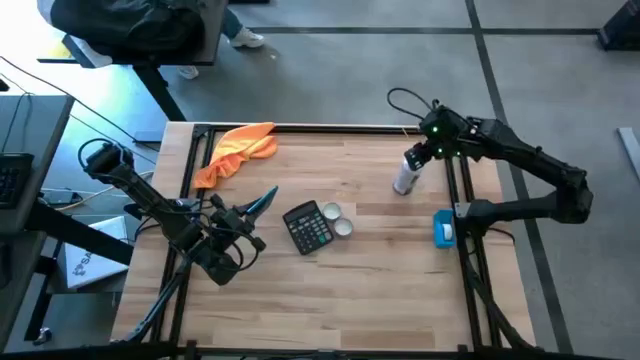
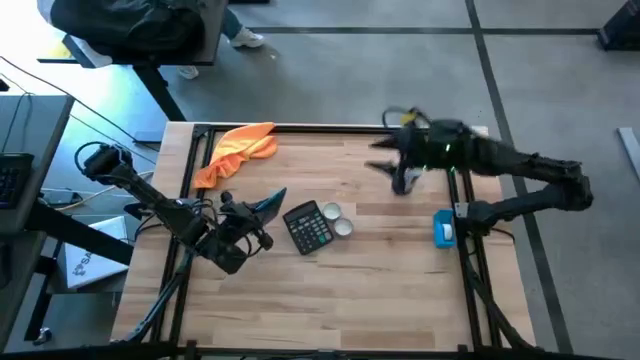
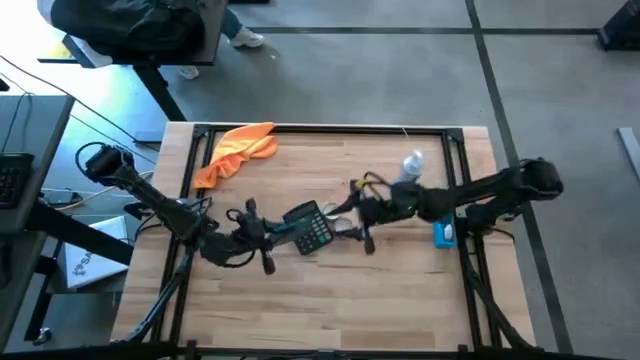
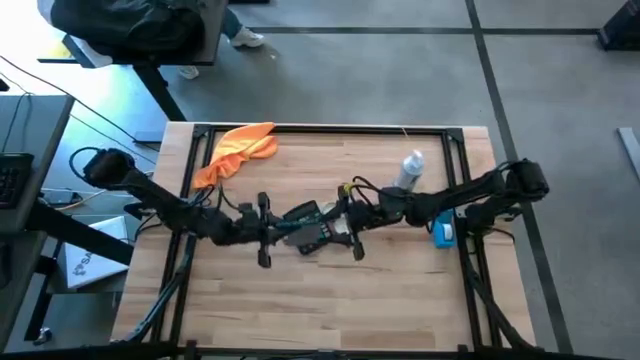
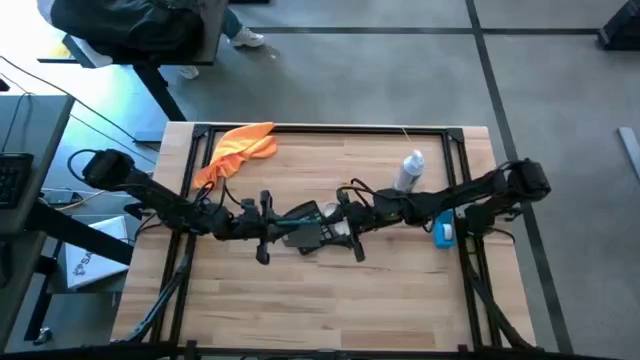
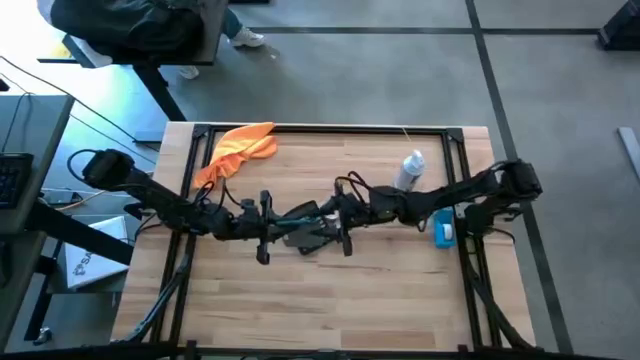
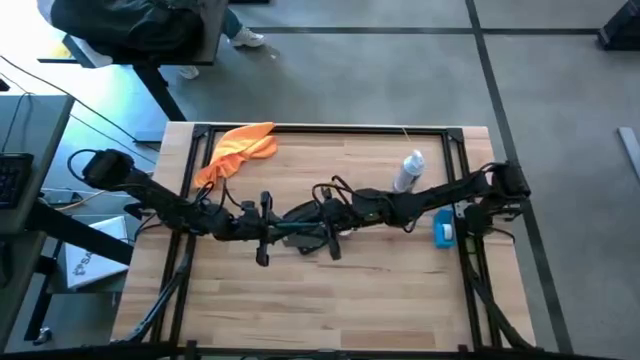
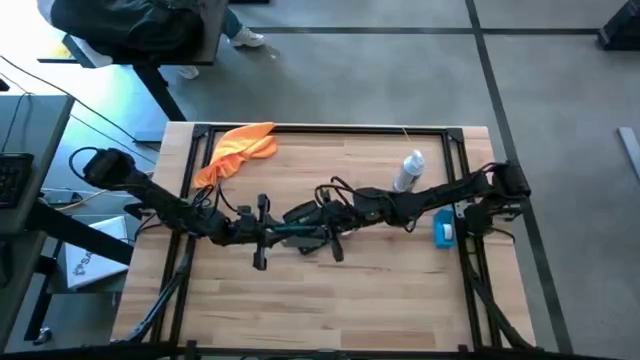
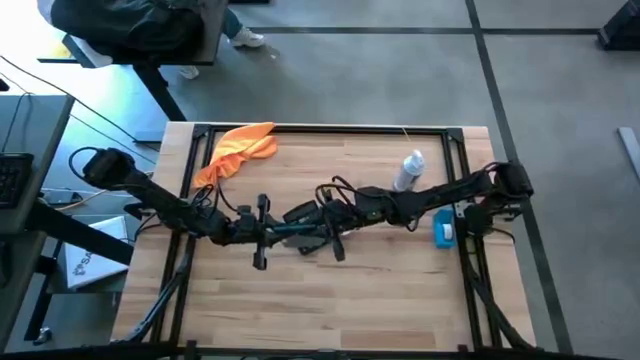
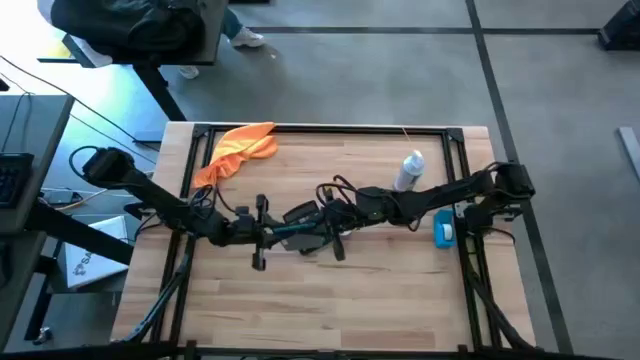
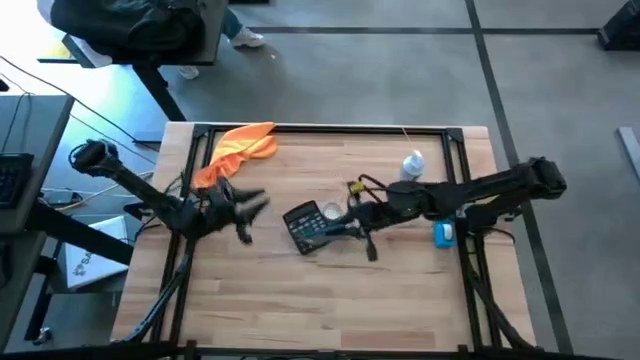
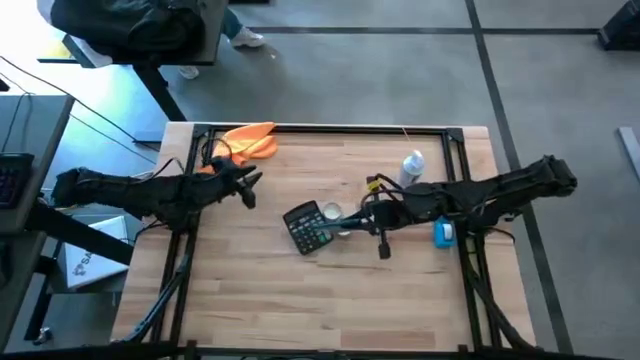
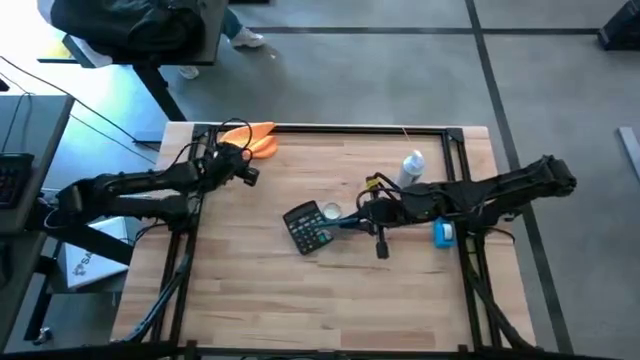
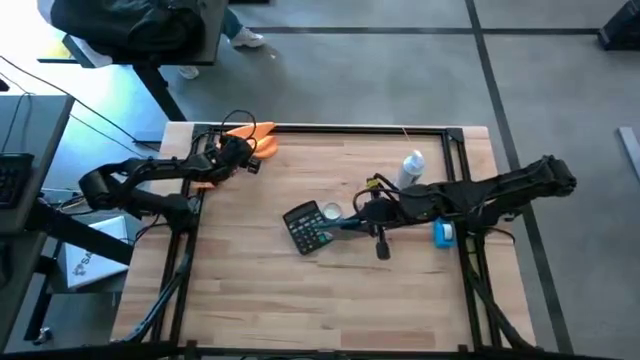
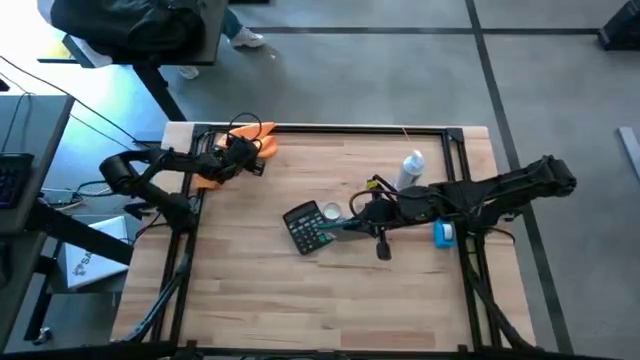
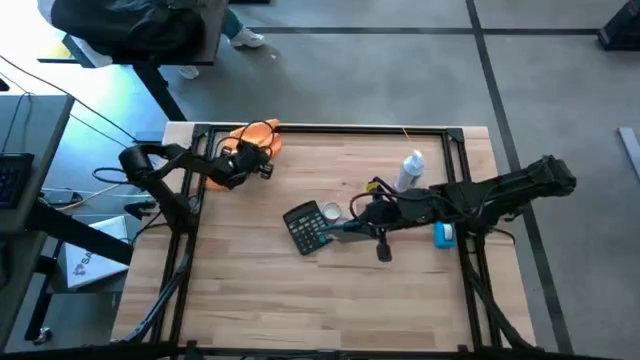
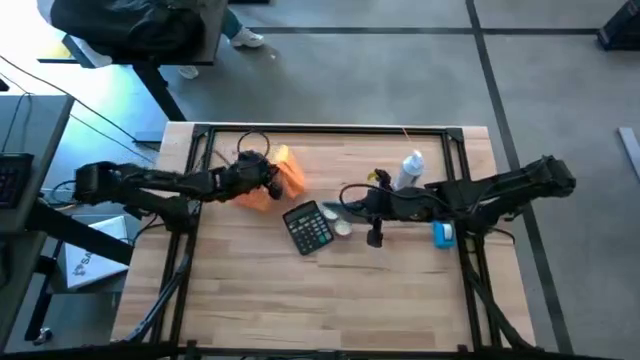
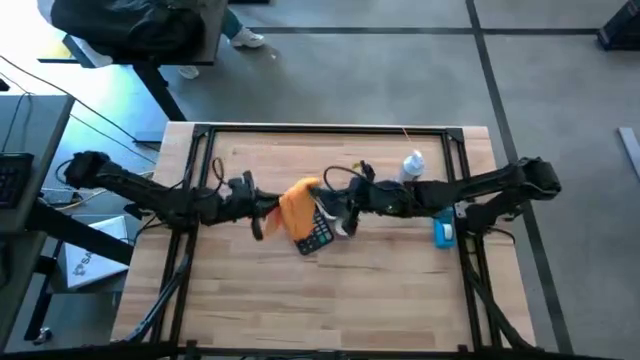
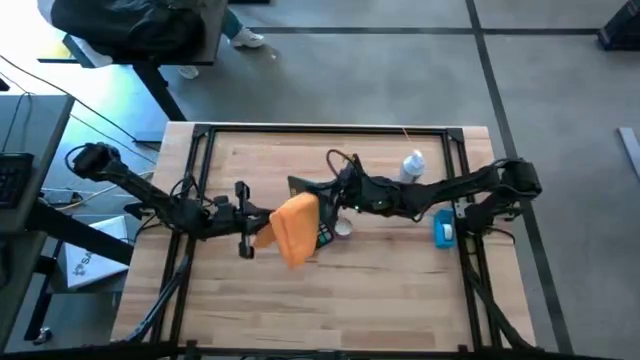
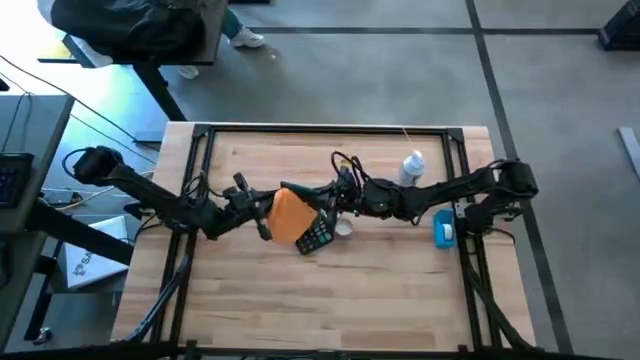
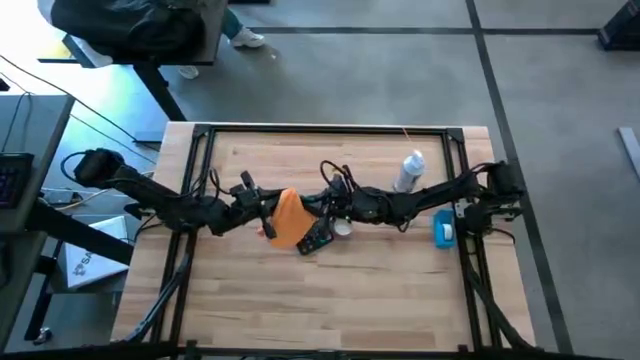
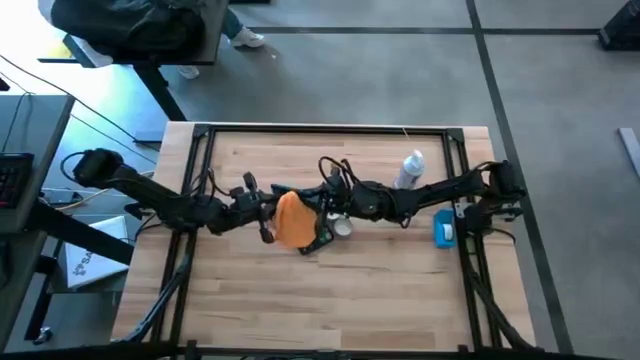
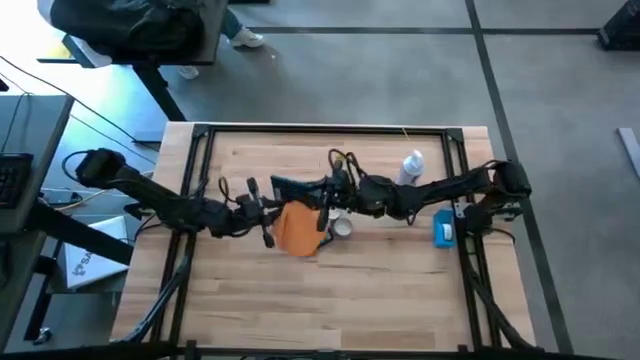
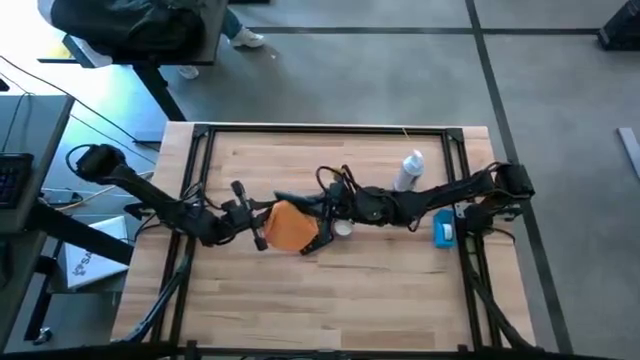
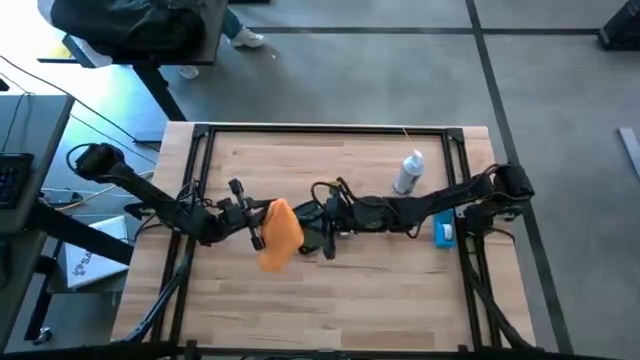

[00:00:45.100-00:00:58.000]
Task: Apply microfiber cloth
Wipe the back of the black tablet with the yellow microfiber cloth

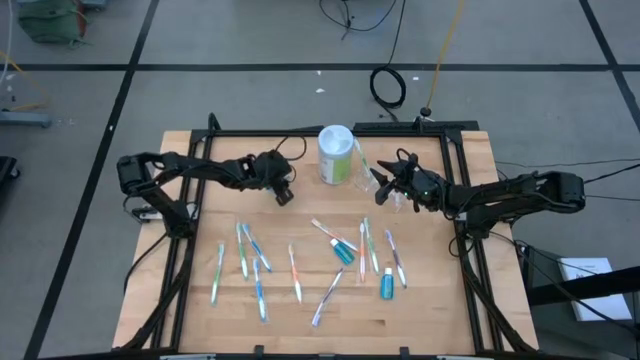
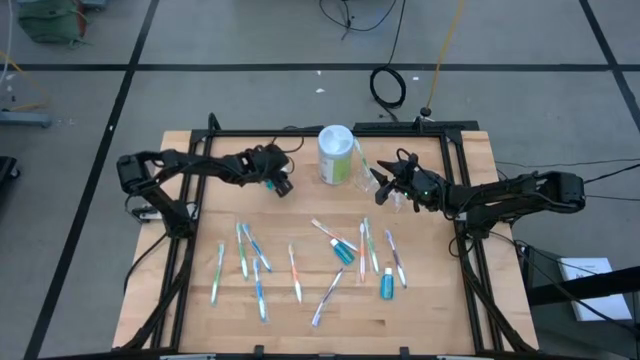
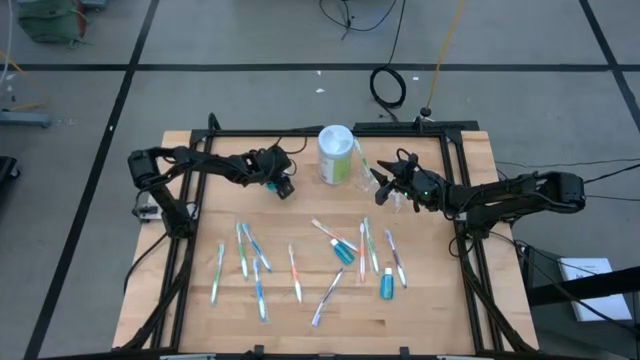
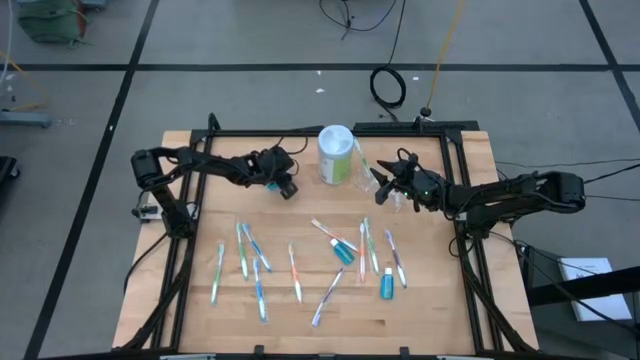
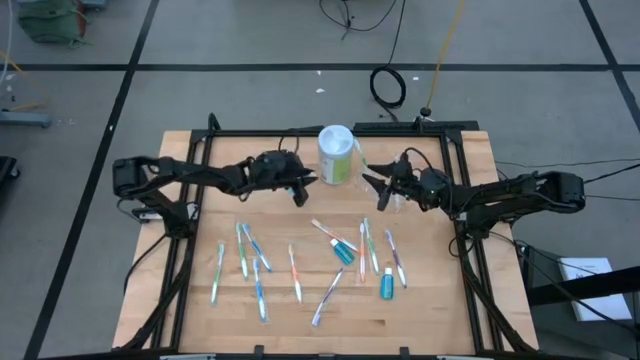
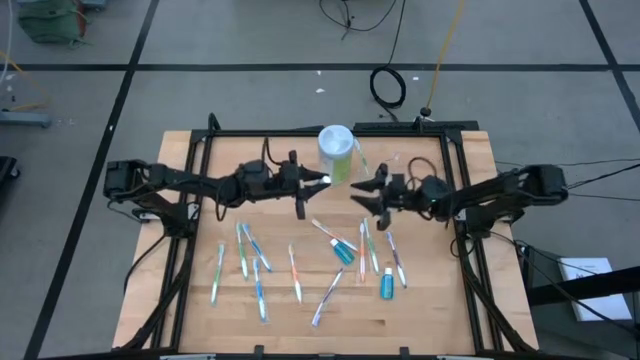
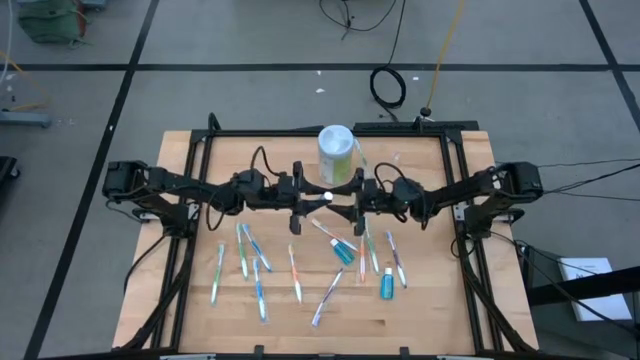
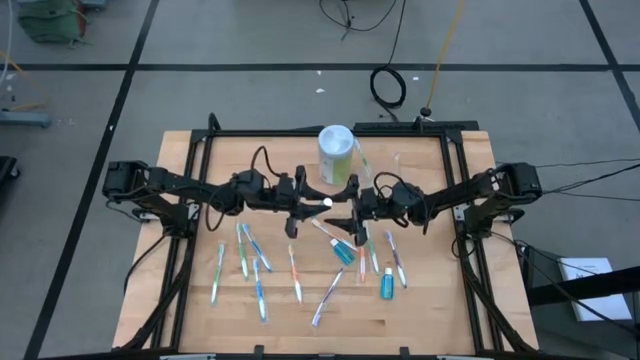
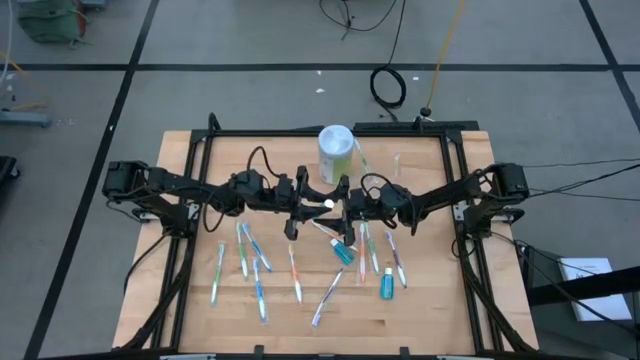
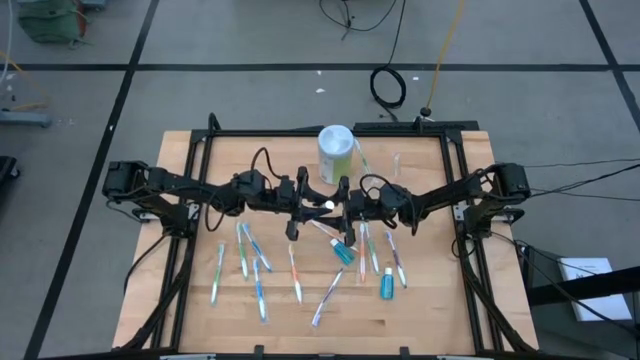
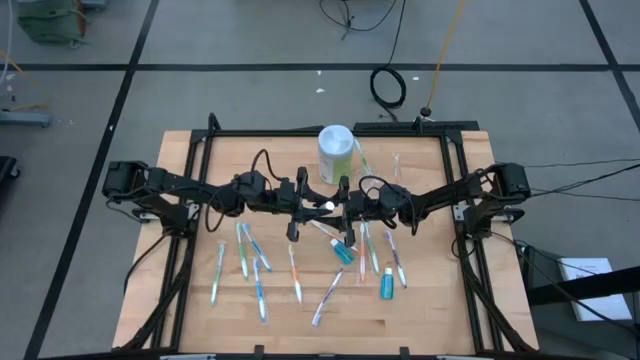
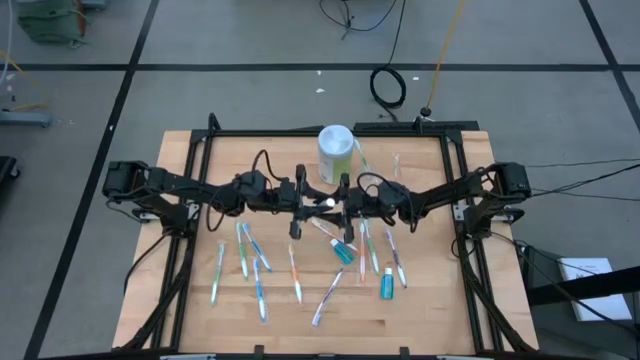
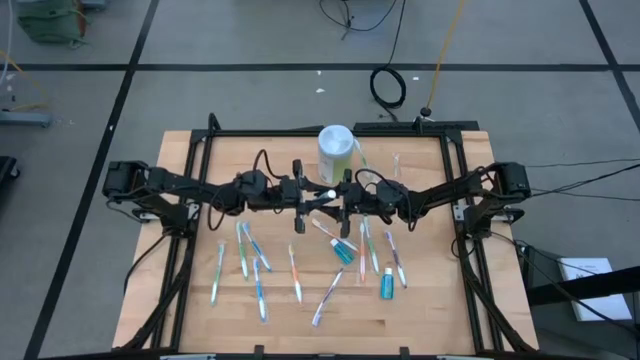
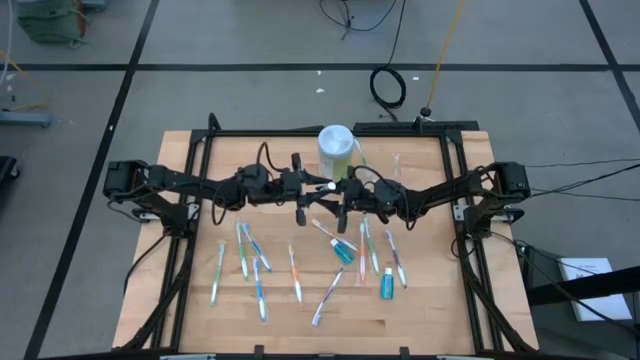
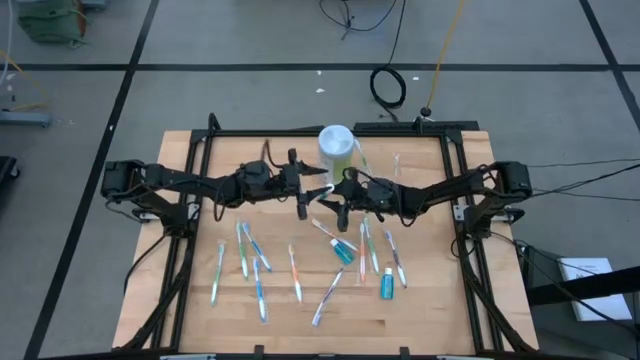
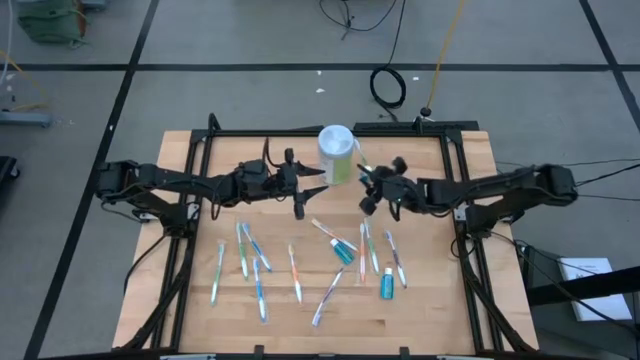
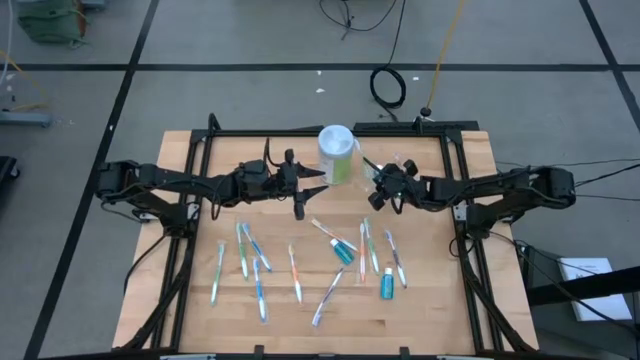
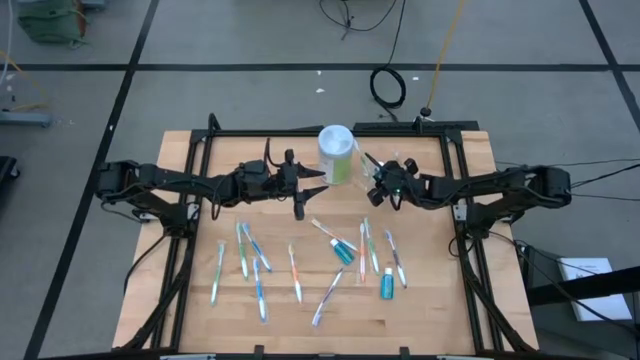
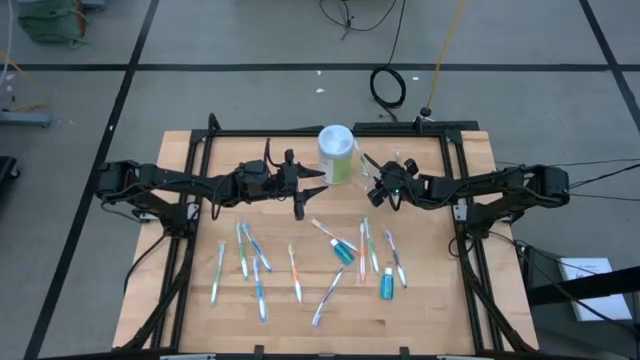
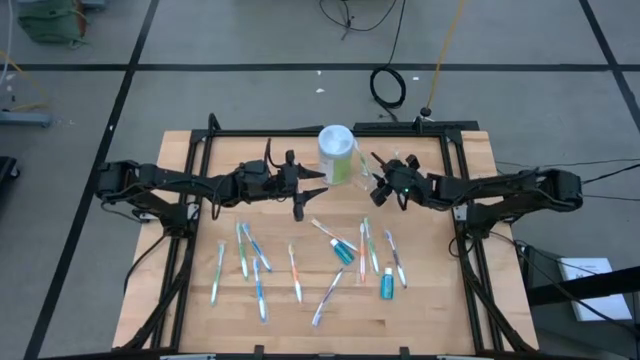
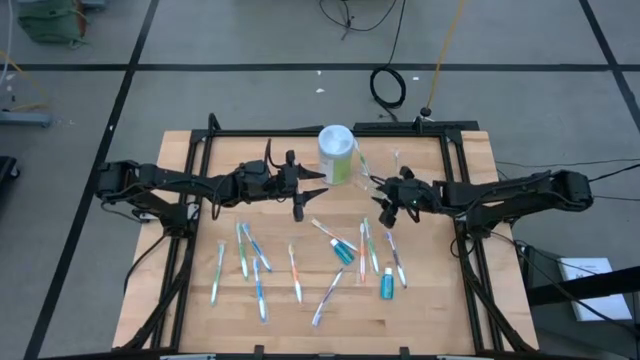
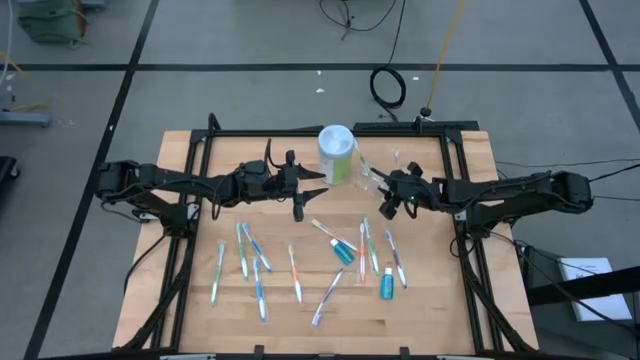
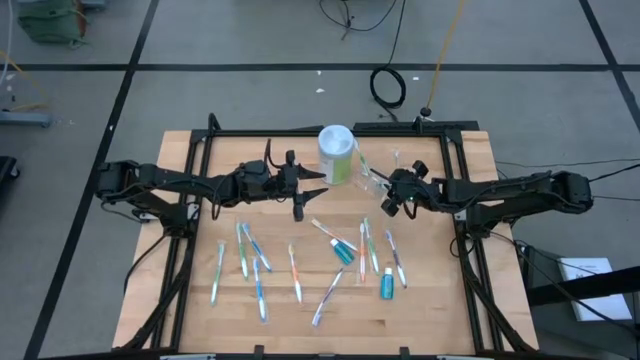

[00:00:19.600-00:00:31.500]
Task: Pick & Place toothbrushing station
Put the blue mouthwash into the transparent organizer
